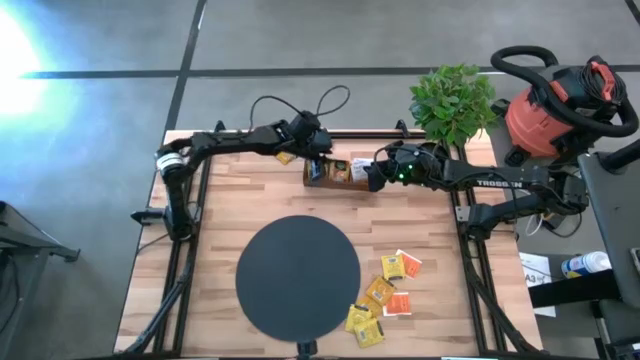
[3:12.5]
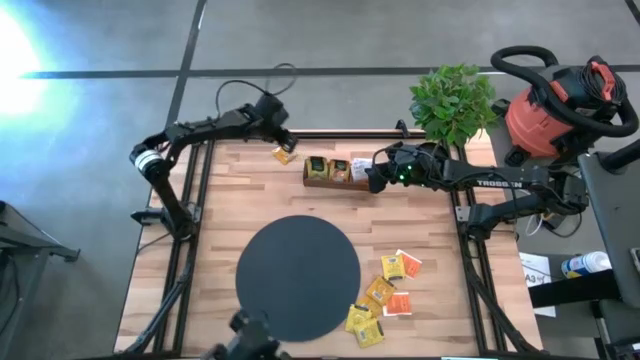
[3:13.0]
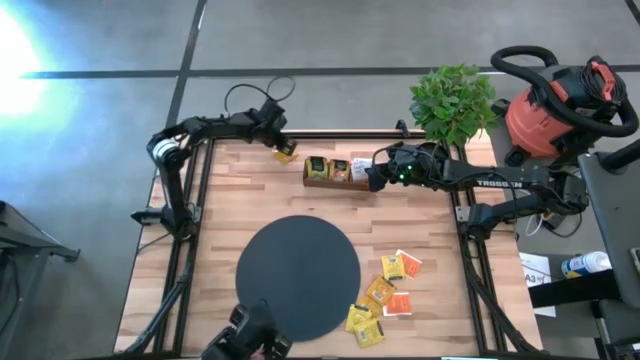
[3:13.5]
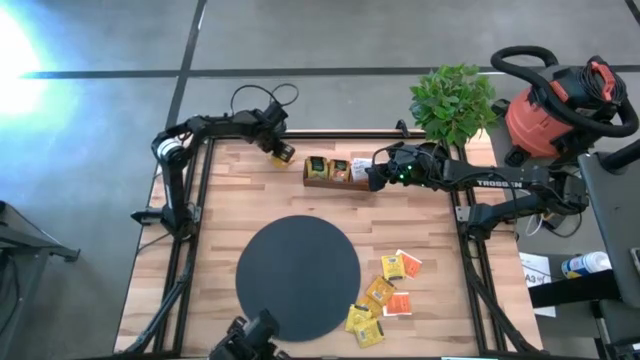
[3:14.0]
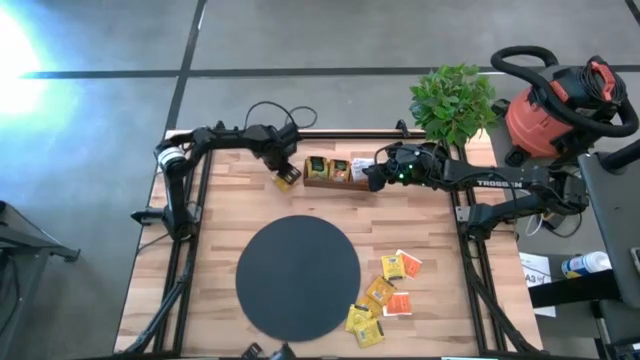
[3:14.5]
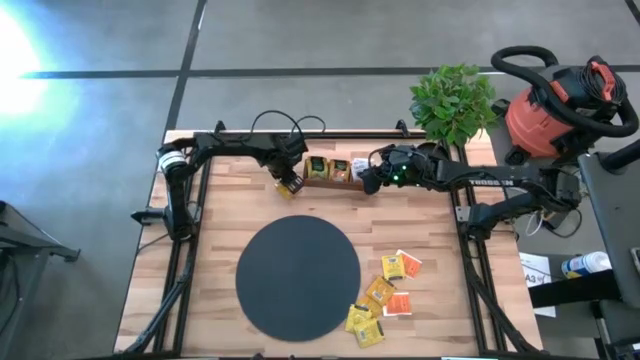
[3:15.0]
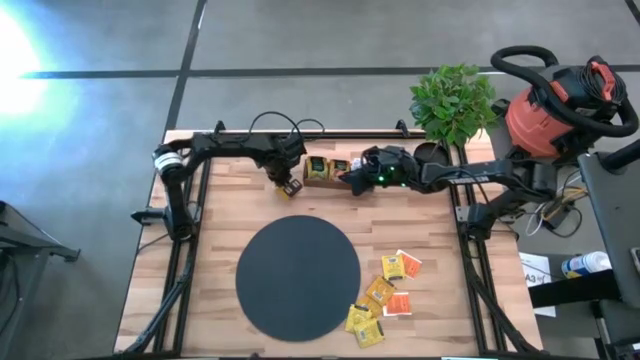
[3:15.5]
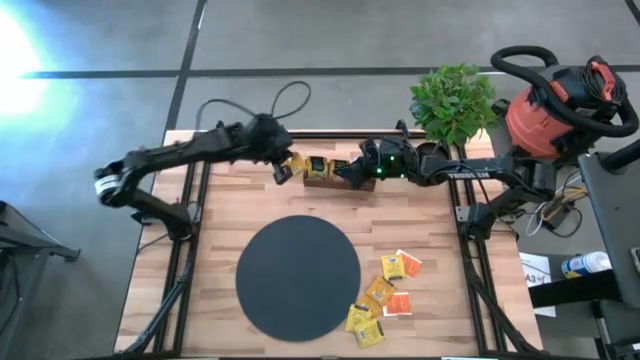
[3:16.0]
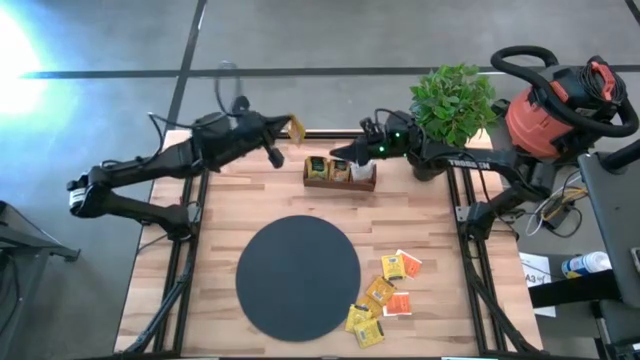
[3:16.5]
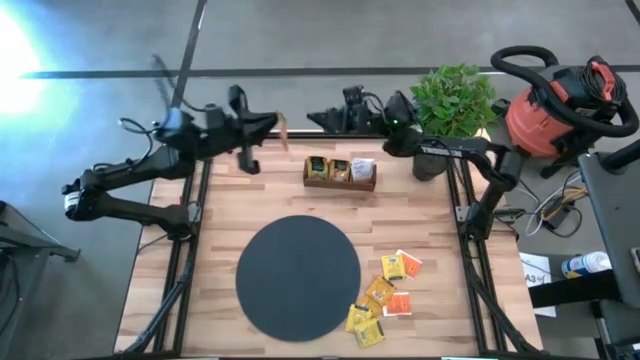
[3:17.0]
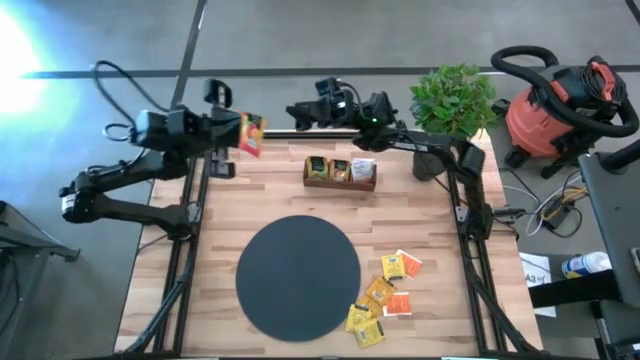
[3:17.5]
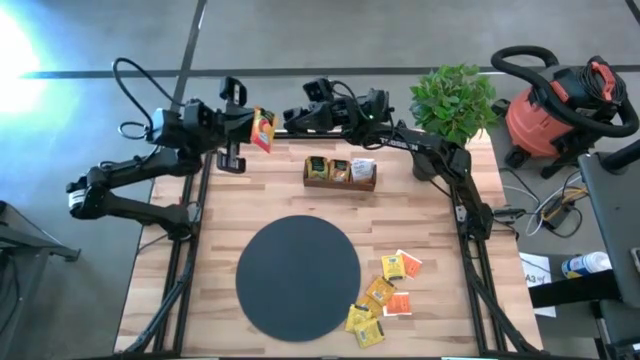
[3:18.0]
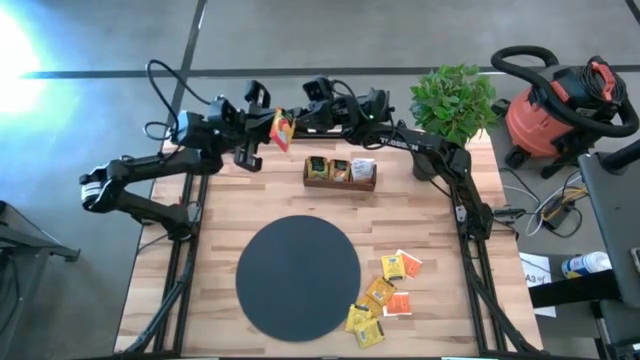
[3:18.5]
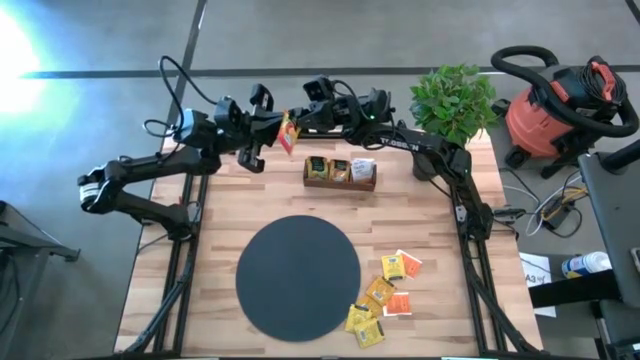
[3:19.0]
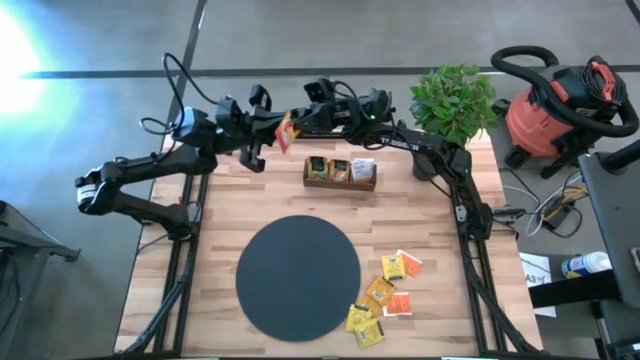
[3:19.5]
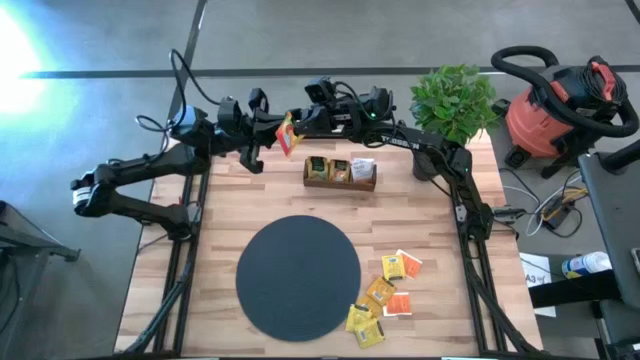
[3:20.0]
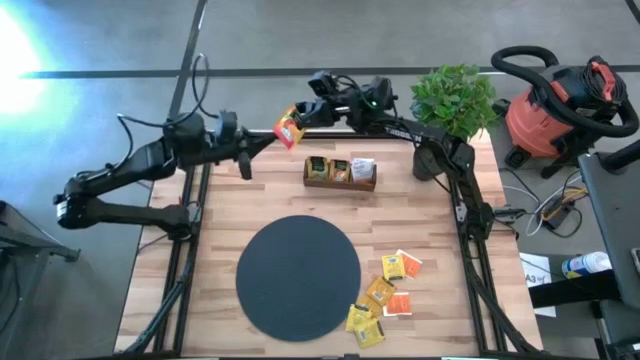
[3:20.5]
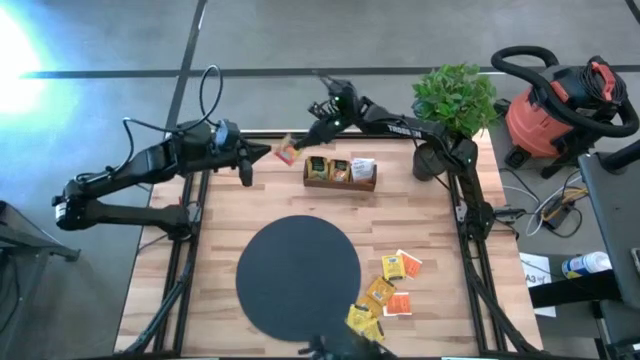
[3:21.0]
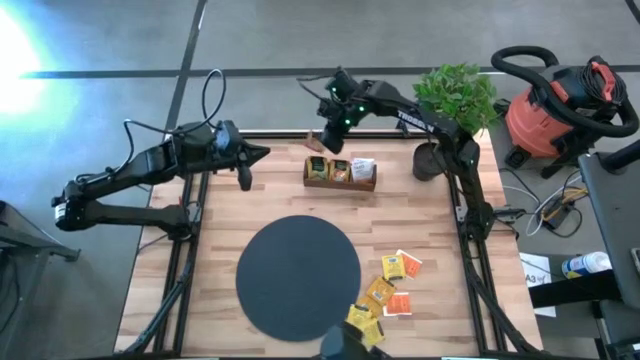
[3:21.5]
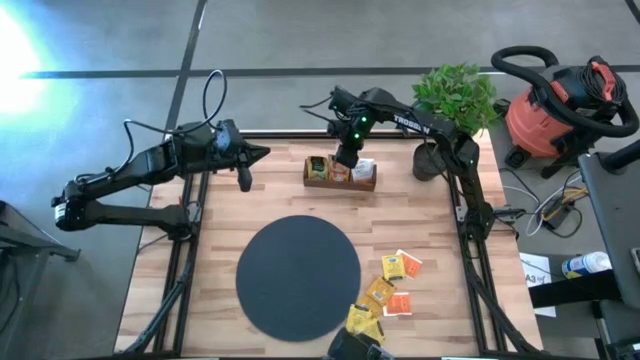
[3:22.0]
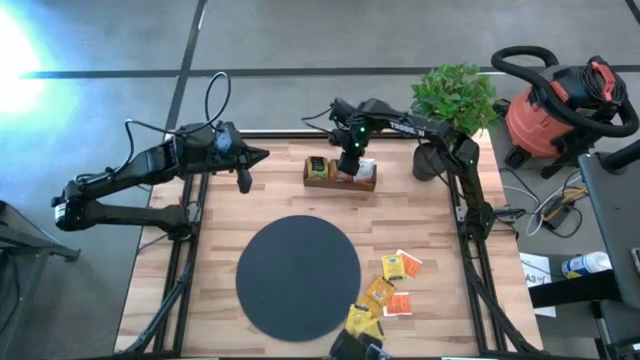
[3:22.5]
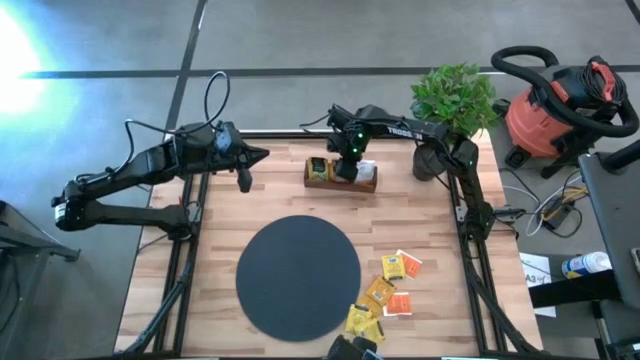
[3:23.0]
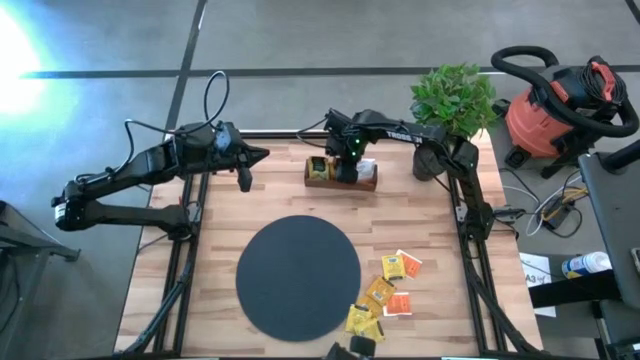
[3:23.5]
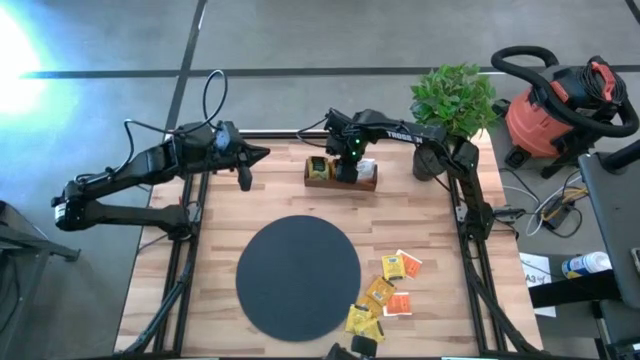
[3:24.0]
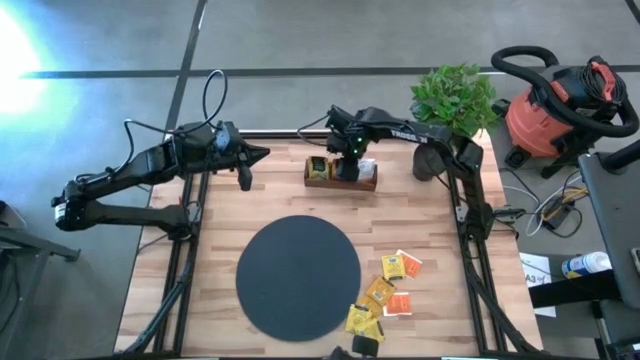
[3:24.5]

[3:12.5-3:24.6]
Task: Pick & Place Tea
Put the top orange tea bag into the middle section of the wooden organizer

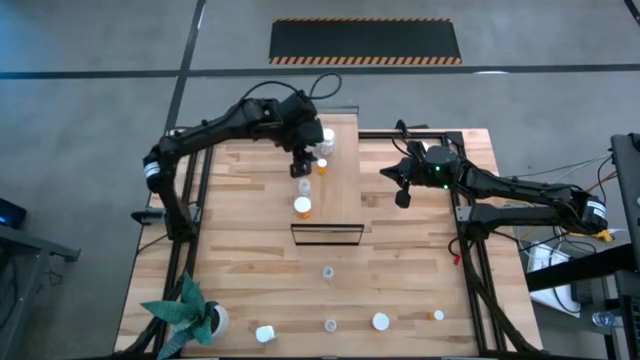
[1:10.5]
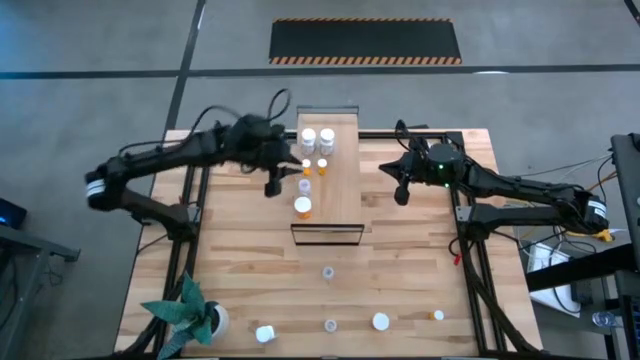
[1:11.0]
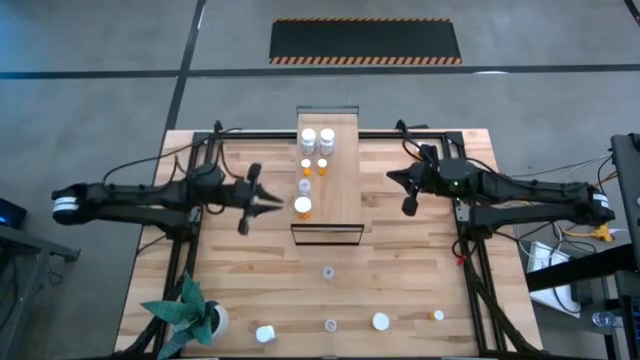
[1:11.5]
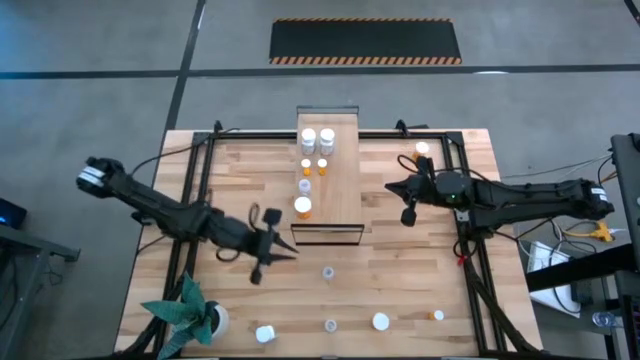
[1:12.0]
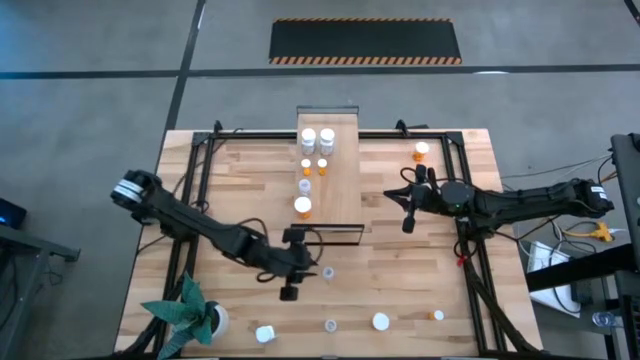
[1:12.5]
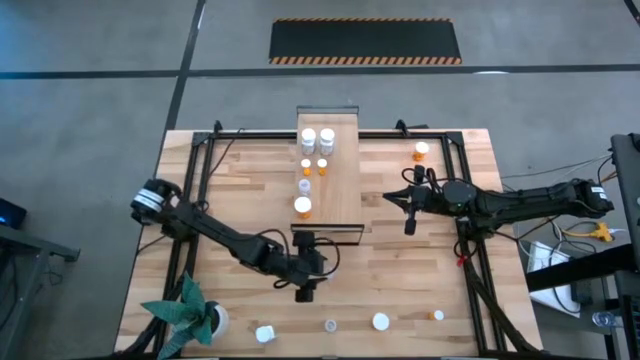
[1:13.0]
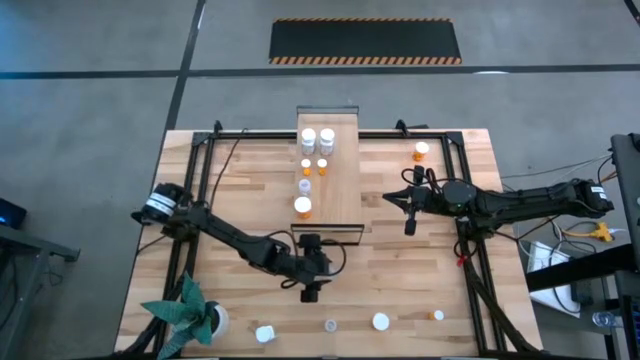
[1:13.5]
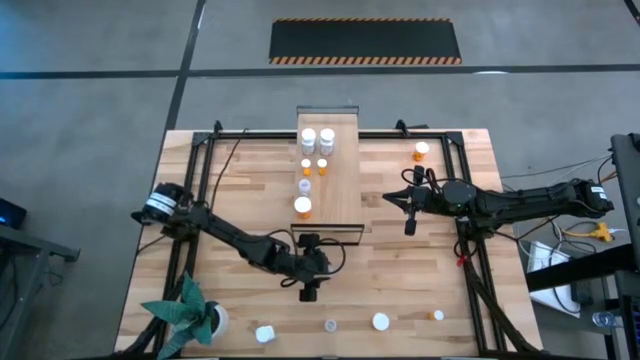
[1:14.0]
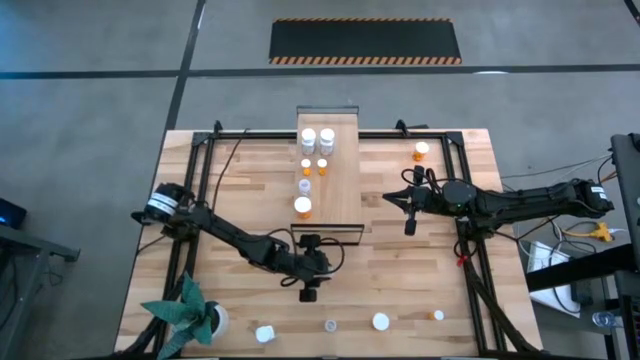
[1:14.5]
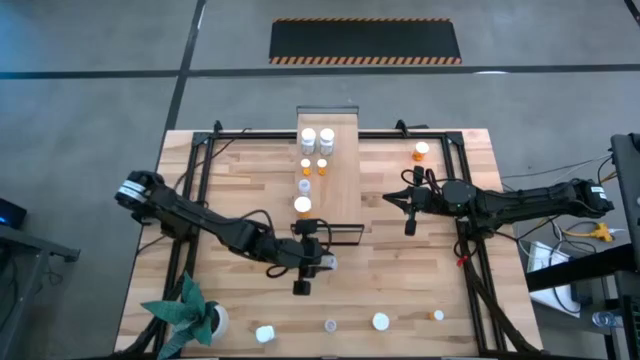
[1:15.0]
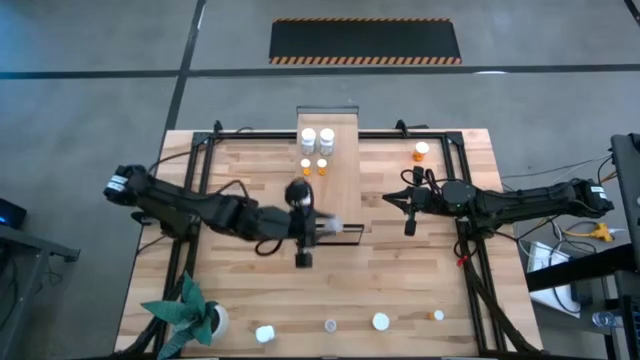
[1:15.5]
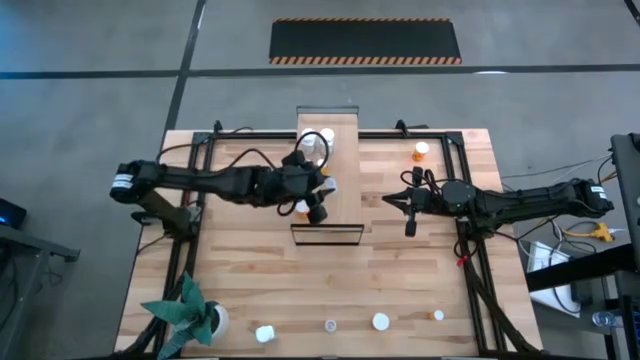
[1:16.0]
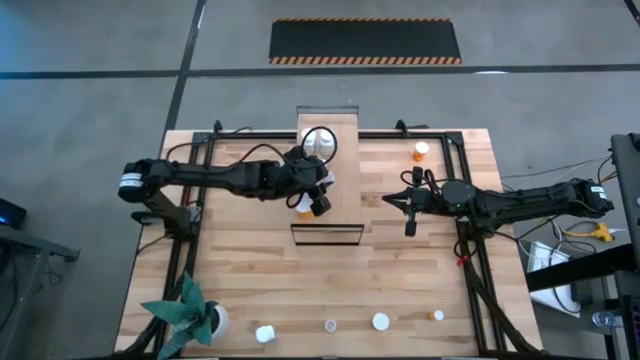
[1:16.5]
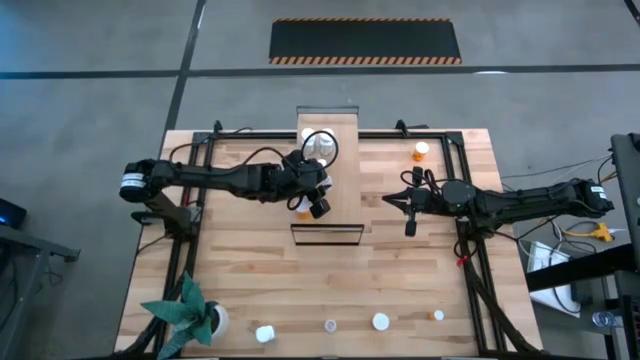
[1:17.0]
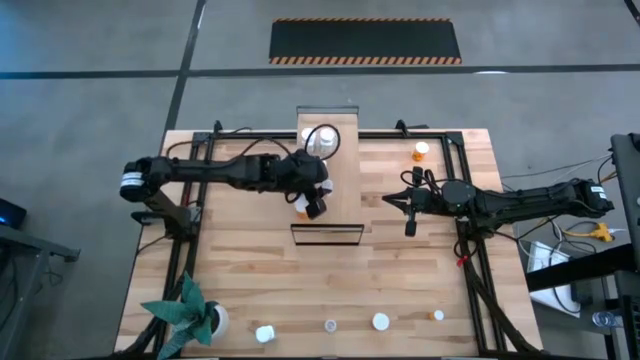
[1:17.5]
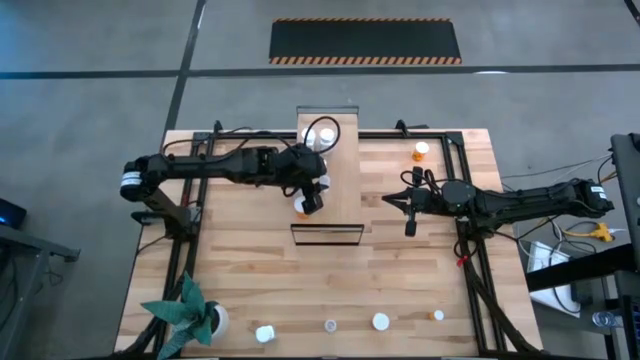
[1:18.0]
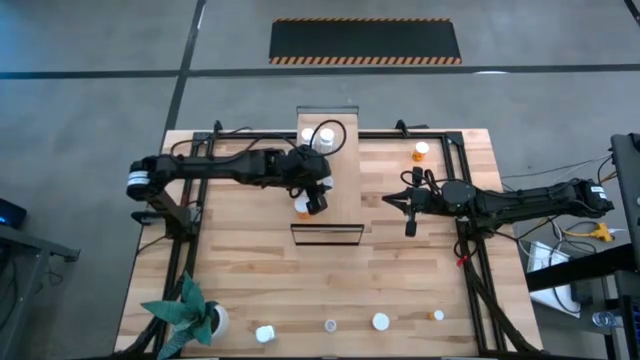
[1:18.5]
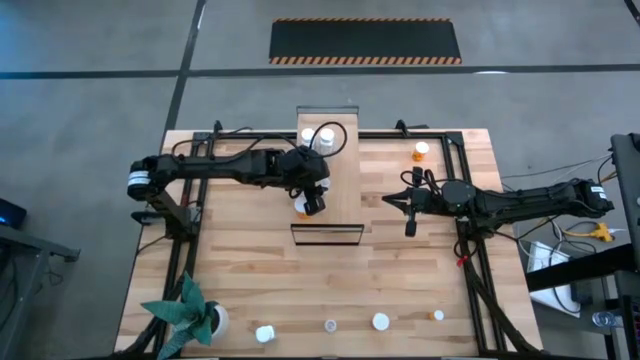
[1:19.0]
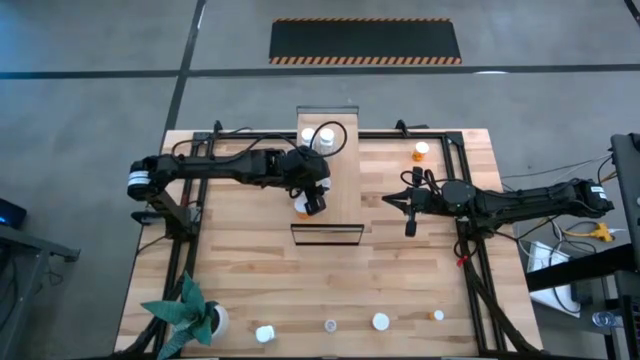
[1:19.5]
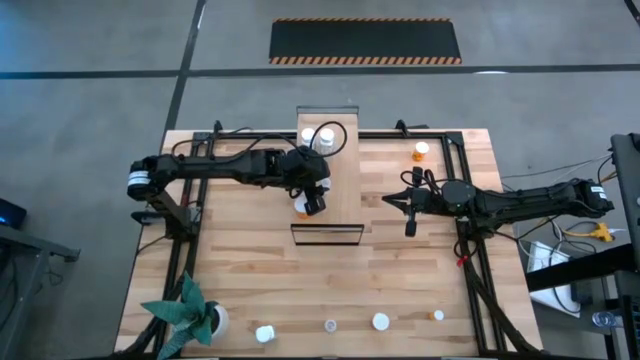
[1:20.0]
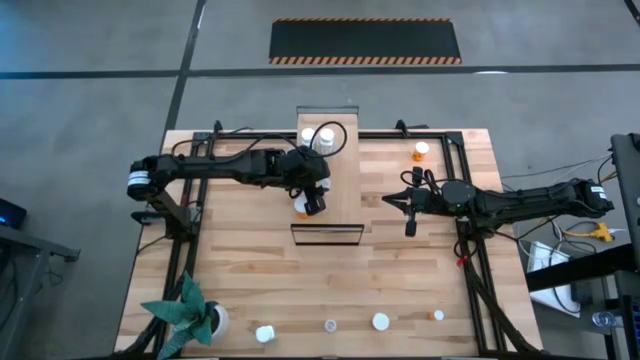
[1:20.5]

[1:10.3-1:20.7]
Task: Pick and place medicine bottles onto shelf by color
Put the top transparent pill bottle aligned with the other transparent pill bottle on the shelf
